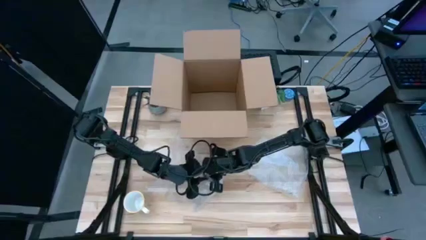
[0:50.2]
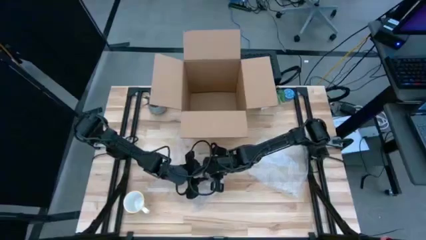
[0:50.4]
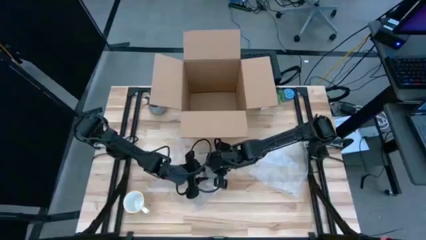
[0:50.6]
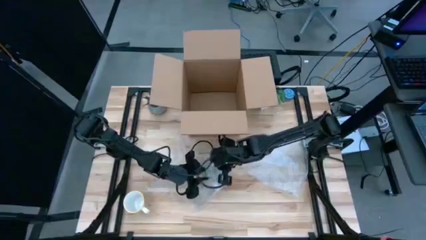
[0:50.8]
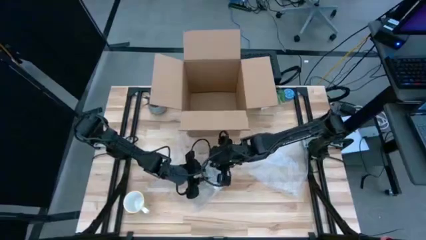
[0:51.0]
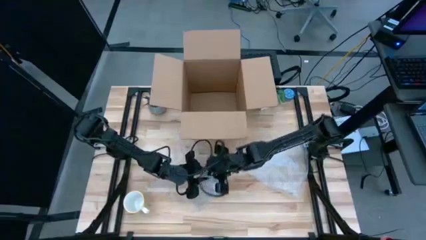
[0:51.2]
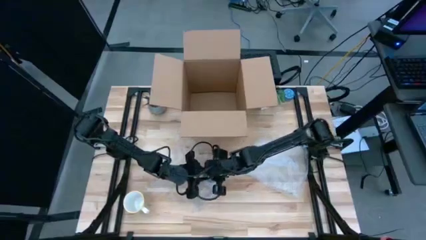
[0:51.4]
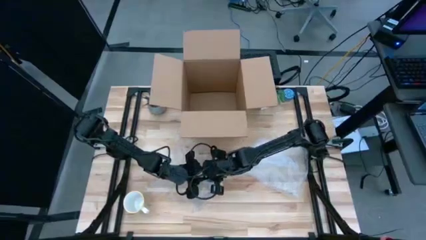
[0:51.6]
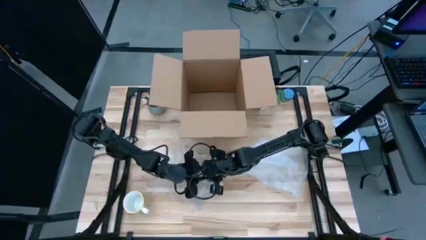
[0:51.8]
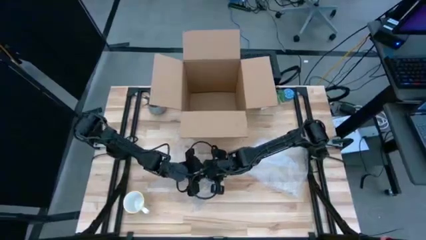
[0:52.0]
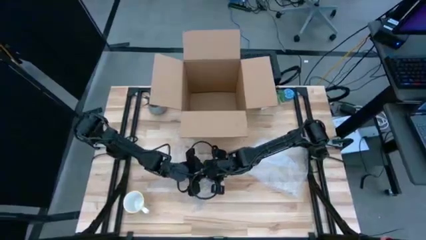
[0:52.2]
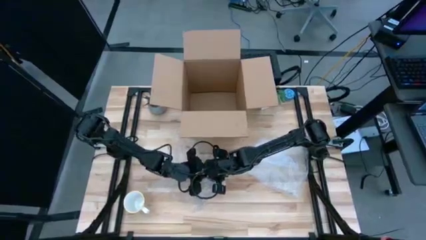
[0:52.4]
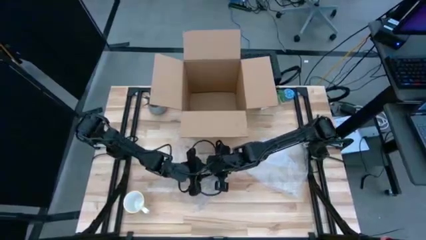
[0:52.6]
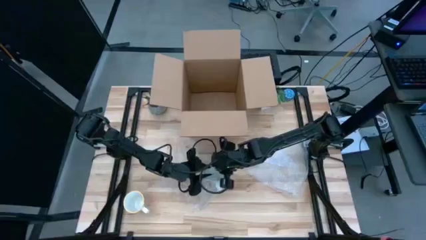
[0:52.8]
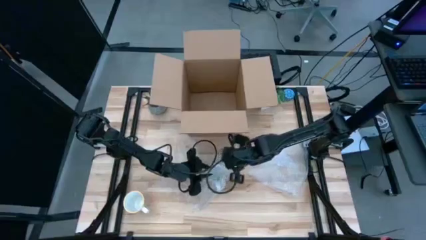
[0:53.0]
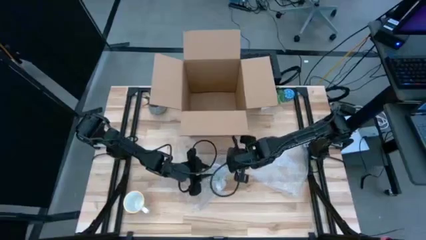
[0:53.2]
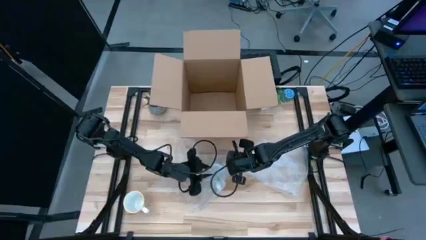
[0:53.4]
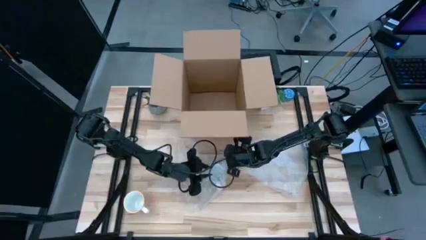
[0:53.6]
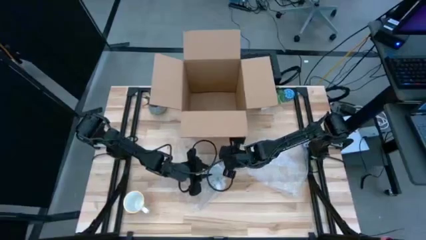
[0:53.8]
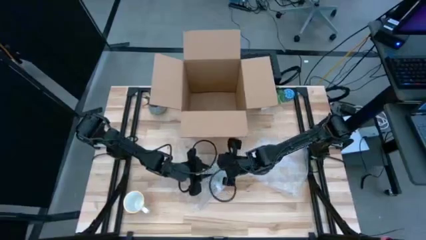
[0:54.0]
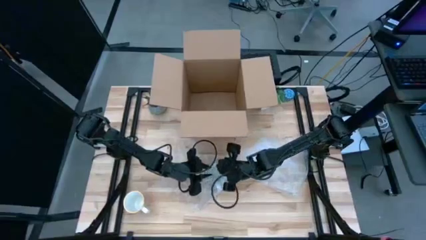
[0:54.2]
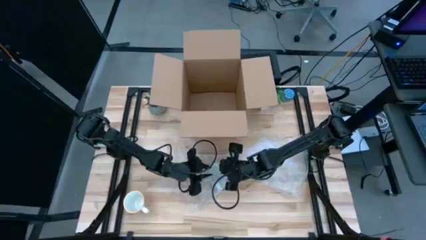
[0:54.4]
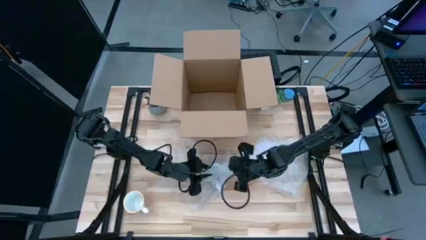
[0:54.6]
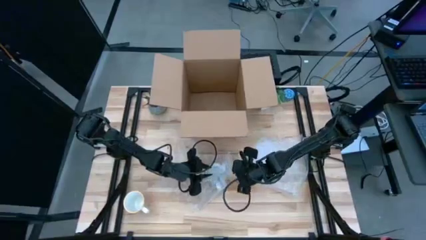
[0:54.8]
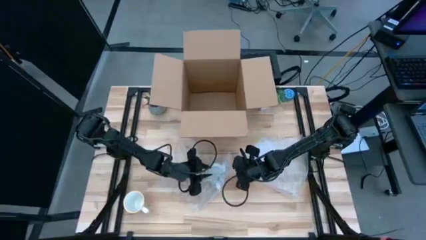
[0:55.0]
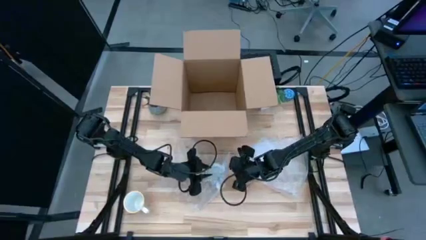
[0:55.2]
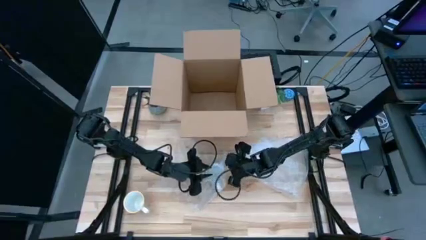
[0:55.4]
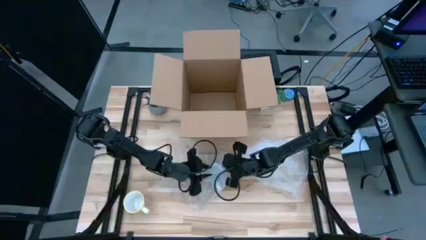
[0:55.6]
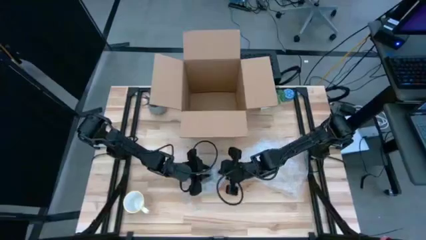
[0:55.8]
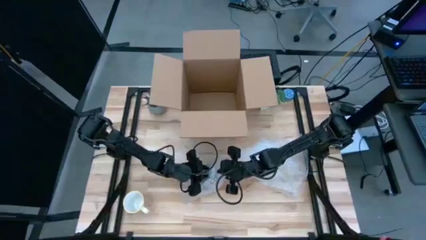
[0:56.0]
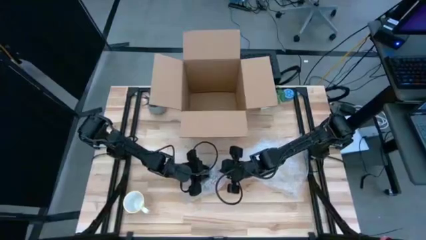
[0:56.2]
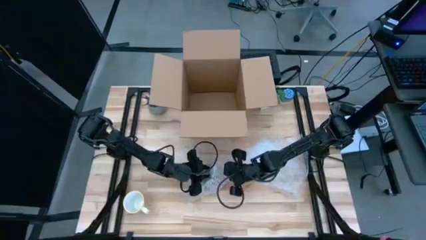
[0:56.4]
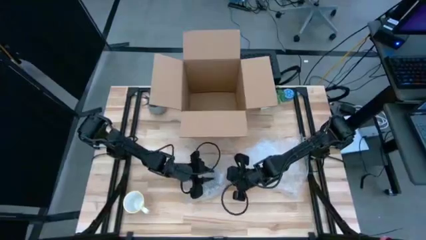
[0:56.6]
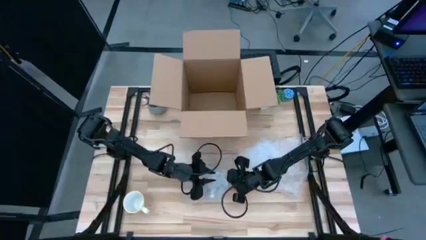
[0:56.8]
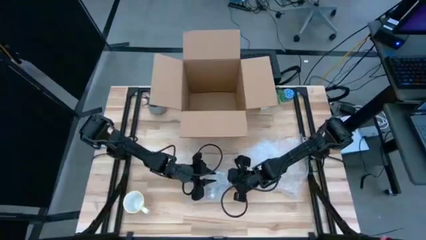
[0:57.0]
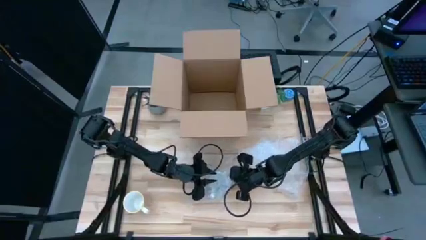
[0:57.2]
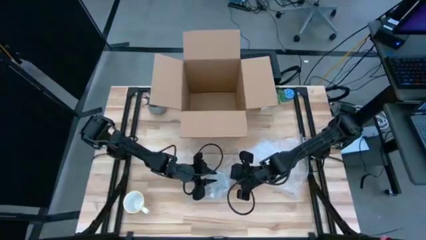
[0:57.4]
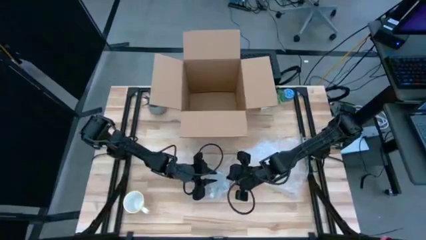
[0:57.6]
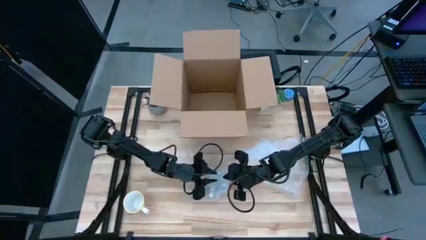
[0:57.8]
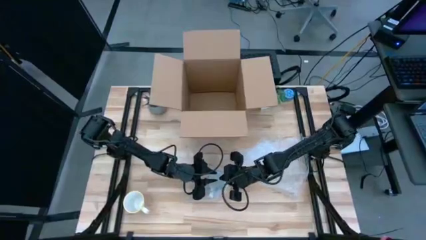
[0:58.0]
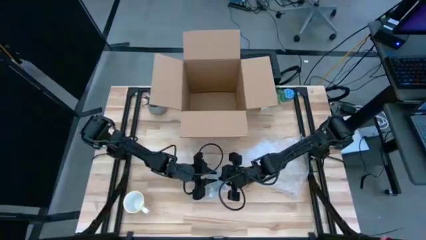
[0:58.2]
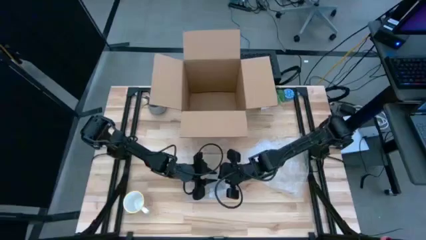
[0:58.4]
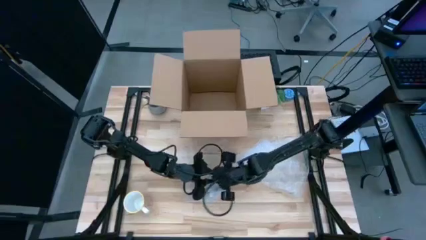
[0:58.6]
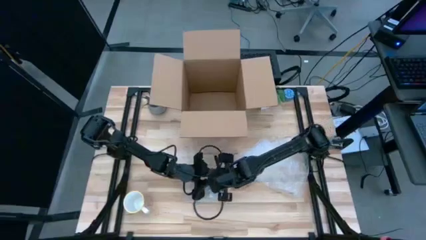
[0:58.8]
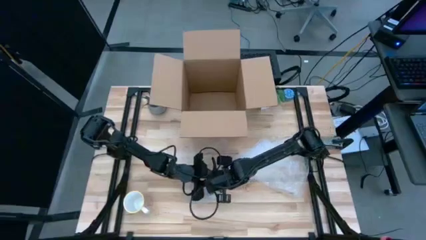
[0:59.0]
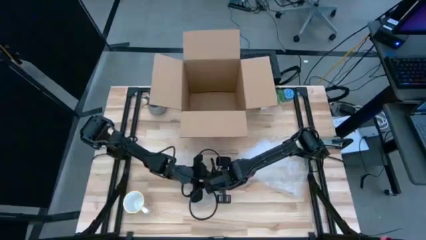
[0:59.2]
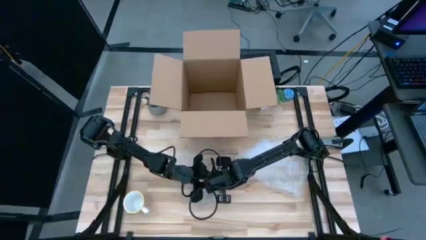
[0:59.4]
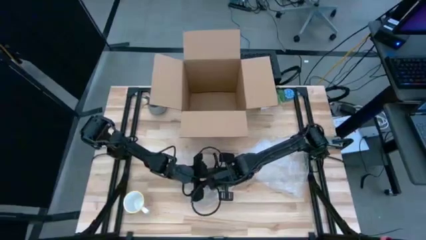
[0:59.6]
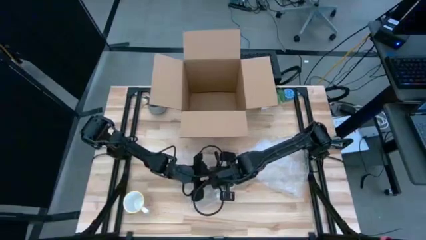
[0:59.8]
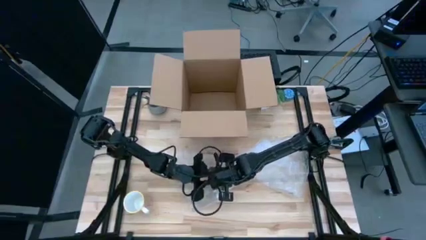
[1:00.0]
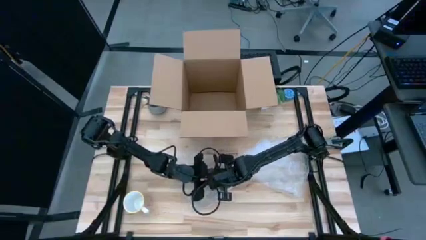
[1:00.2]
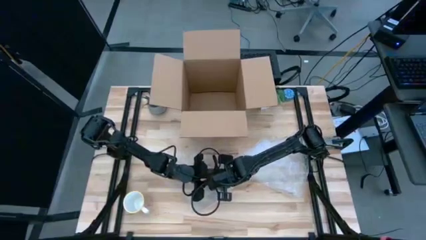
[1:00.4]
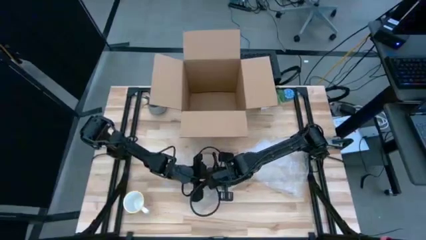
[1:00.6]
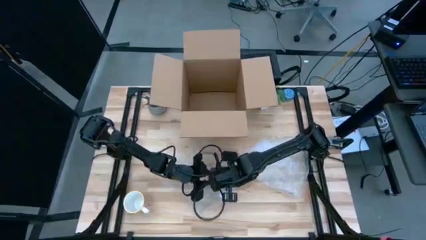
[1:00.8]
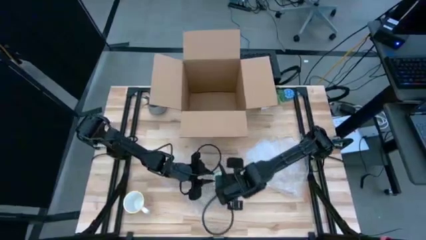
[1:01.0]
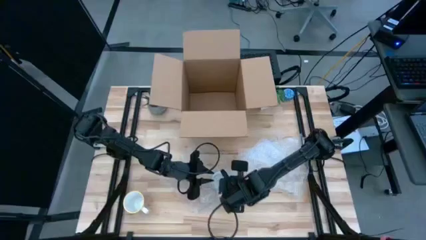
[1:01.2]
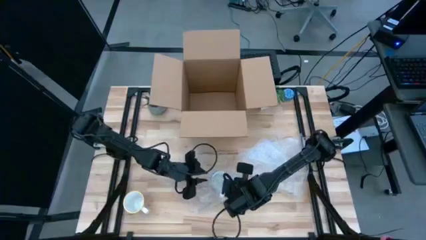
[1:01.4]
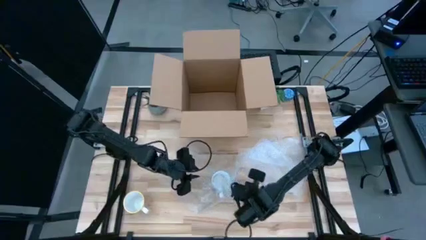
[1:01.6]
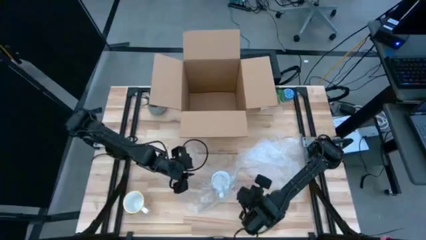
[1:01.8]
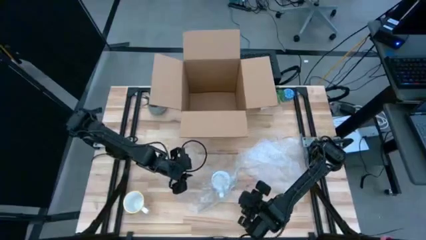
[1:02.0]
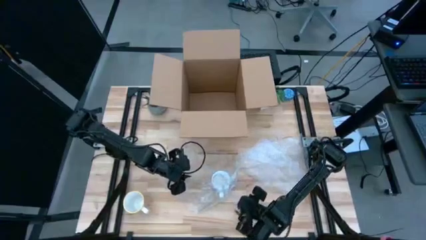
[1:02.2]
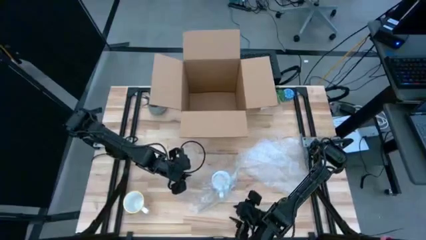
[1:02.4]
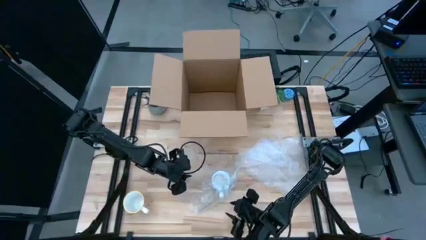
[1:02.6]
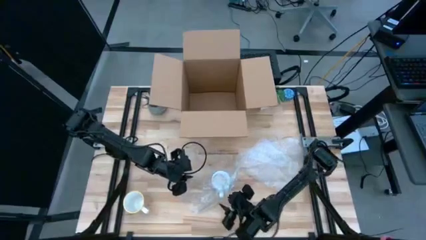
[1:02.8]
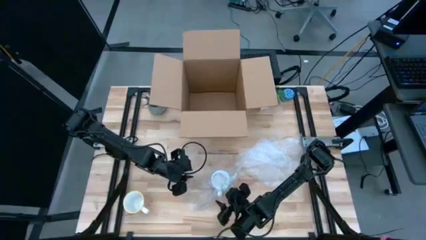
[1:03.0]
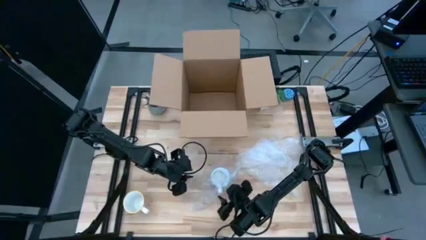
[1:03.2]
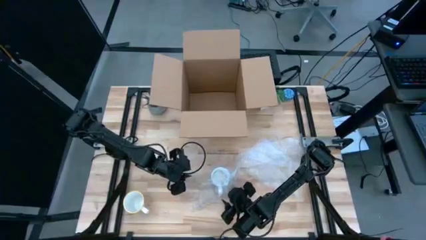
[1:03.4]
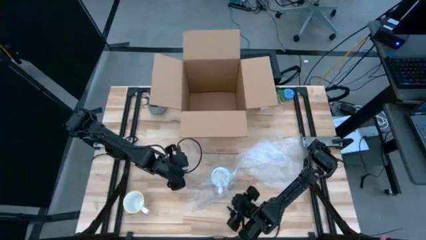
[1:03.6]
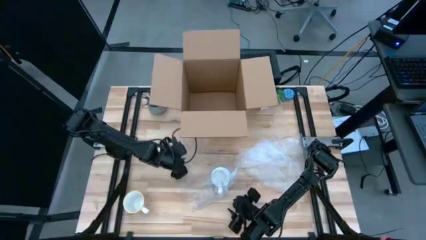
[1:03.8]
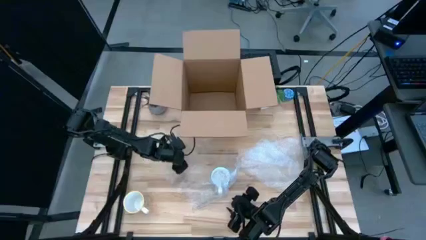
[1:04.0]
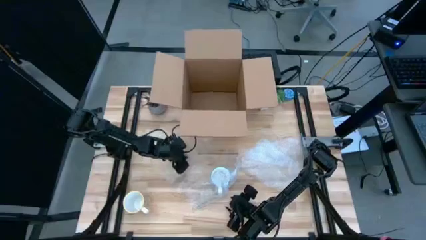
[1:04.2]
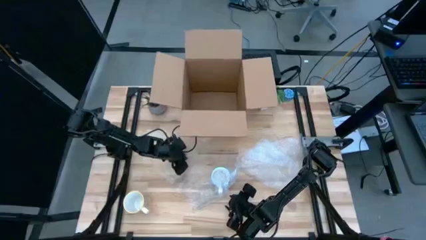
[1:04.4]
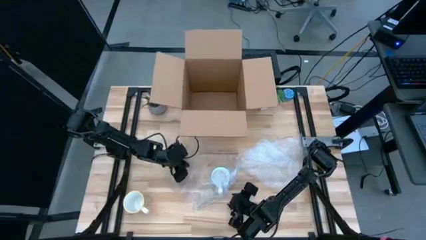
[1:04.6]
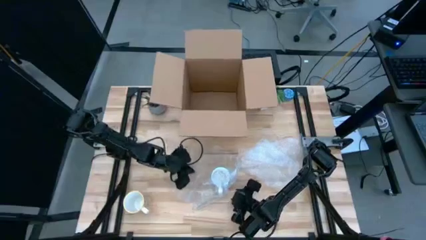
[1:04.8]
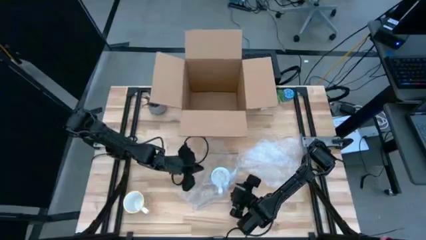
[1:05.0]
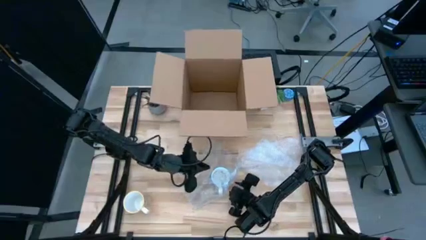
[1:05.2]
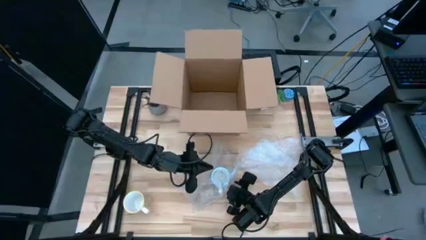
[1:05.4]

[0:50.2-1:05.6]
Task: wrap mug
Wrap the red mug with the left bubble wrap

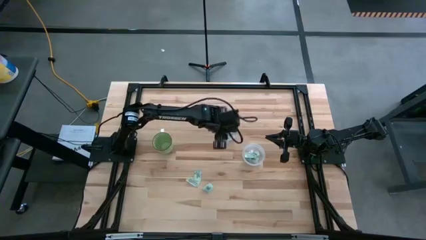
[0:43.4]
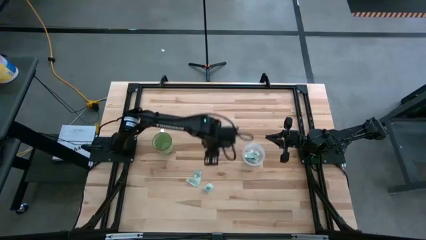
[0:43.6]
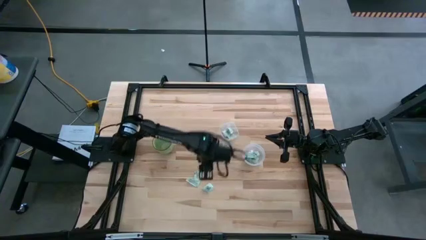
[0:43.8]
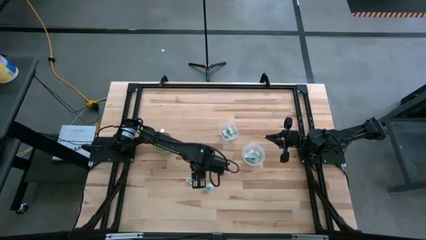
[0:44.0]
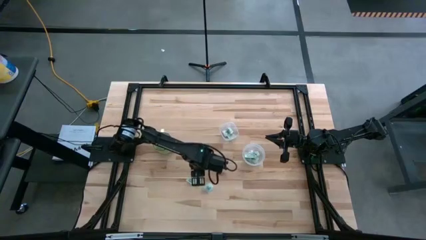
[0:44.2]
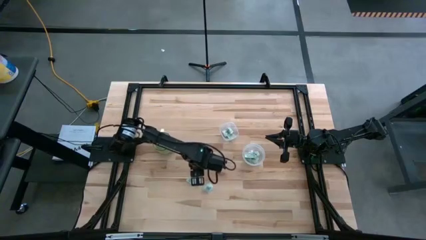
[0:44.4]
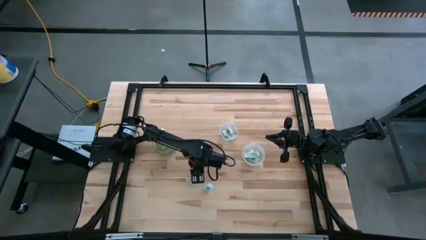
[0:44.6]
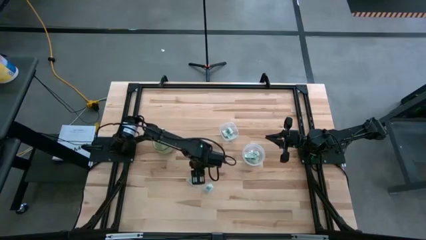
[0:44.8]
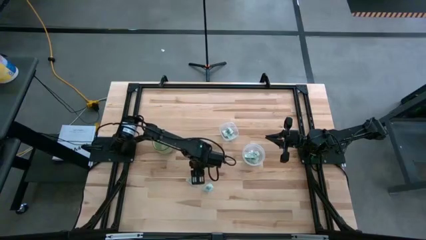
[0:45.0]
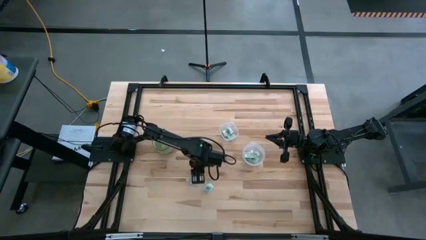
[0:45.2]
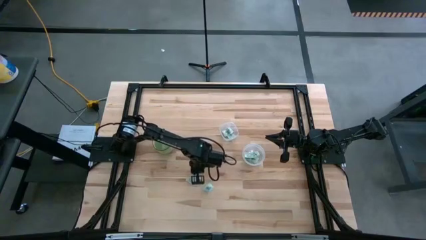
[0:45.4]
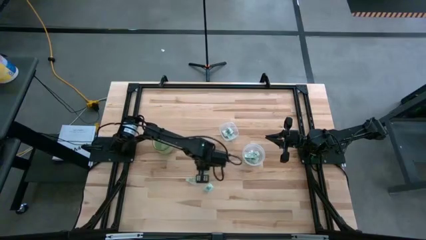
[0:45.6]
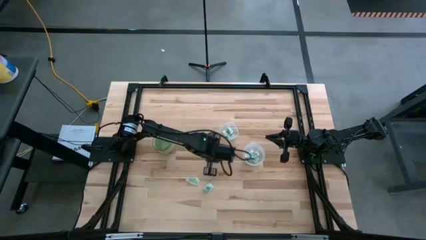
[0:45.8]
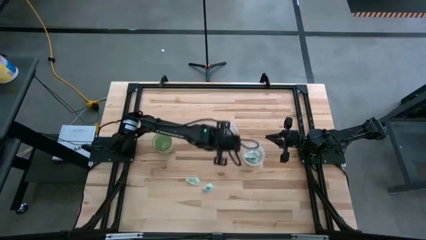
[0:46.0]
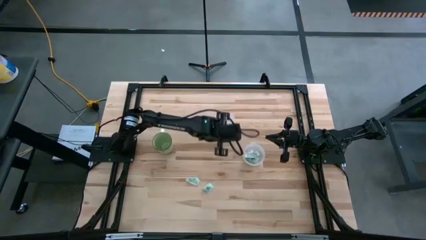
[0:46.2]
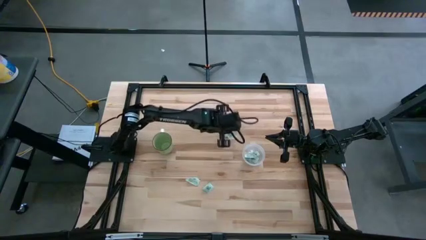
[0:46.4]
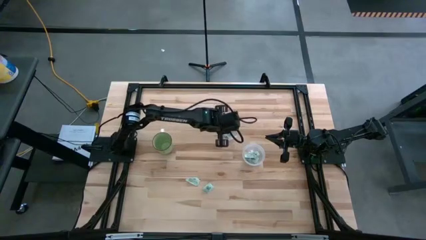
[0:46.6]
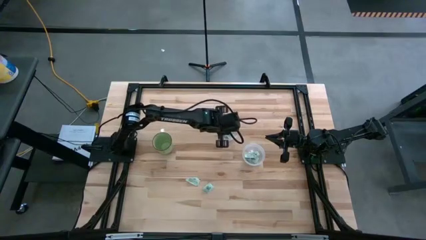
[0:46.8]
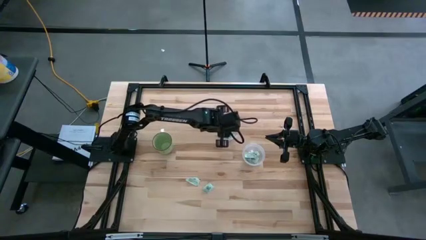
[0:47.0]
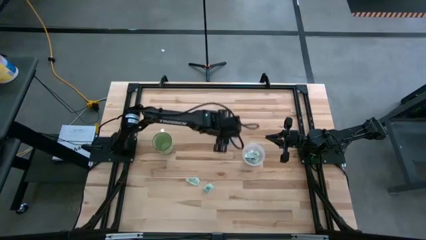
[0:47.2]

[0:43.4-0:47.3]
Task: Pick and place Stevia / Truvia into bins
Put the stevia packet into the top transparent container
